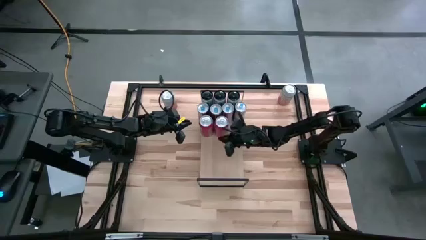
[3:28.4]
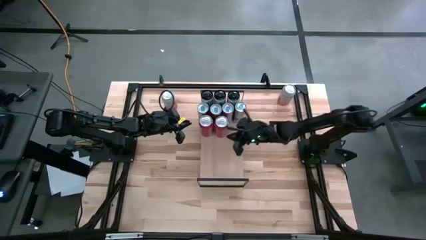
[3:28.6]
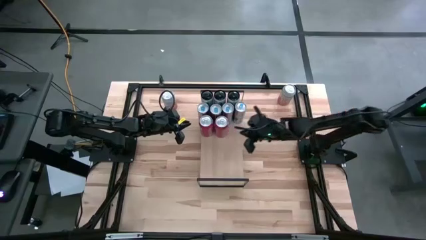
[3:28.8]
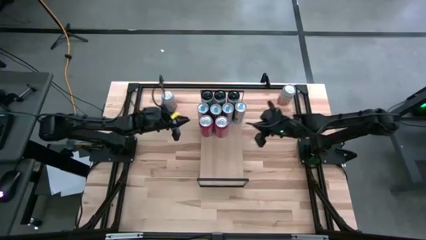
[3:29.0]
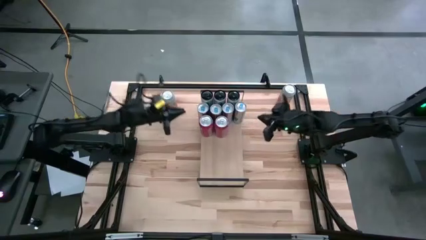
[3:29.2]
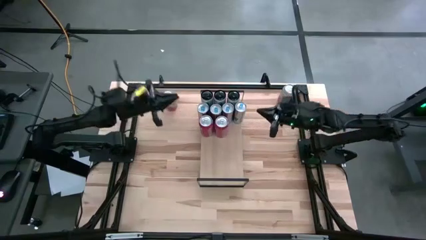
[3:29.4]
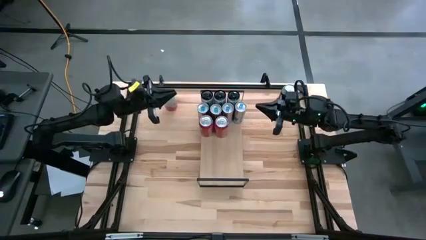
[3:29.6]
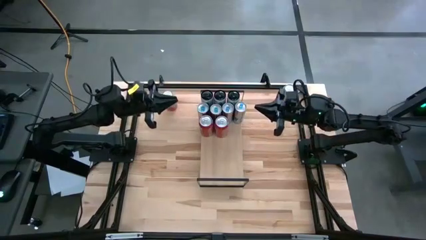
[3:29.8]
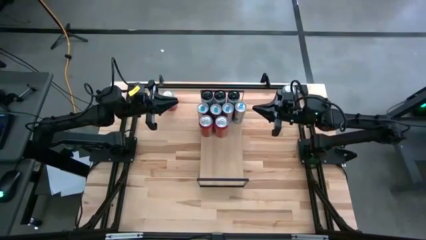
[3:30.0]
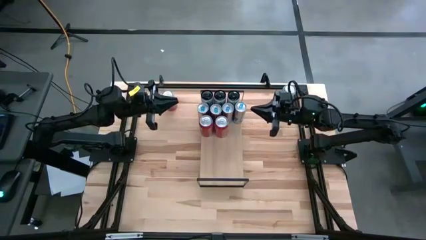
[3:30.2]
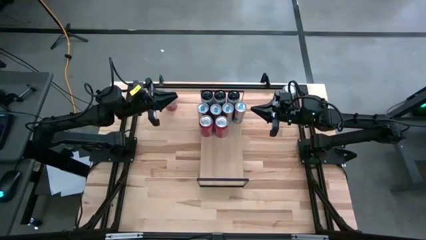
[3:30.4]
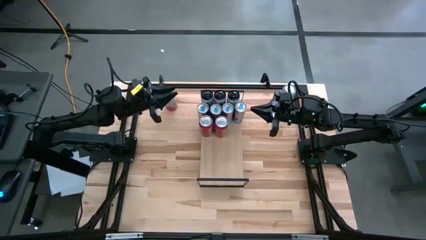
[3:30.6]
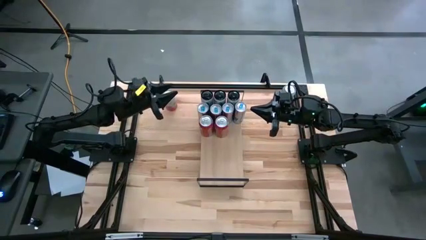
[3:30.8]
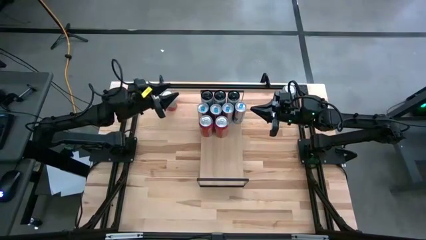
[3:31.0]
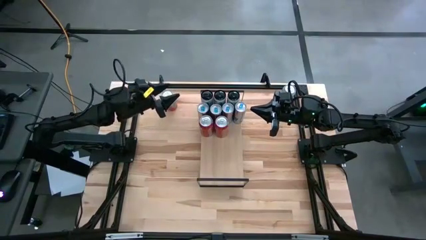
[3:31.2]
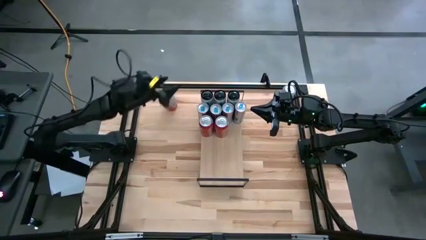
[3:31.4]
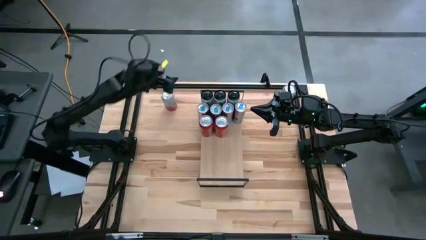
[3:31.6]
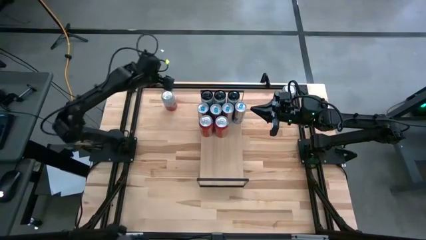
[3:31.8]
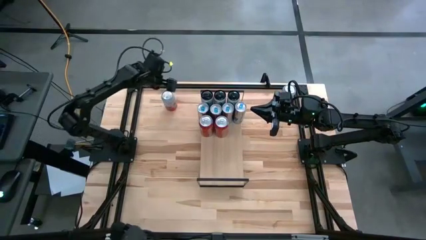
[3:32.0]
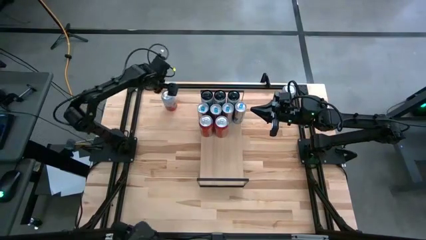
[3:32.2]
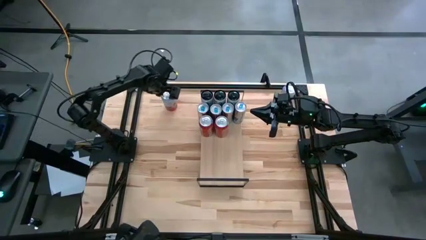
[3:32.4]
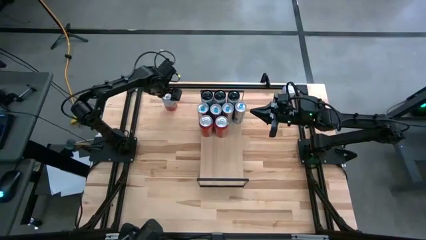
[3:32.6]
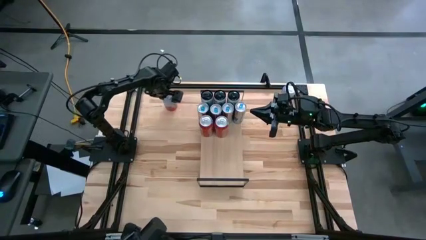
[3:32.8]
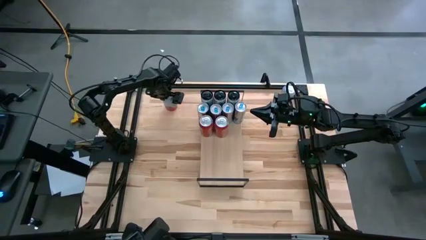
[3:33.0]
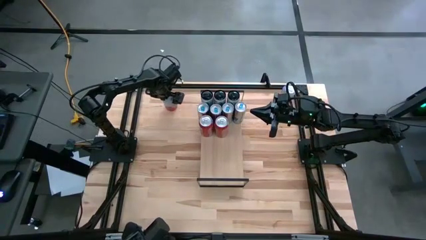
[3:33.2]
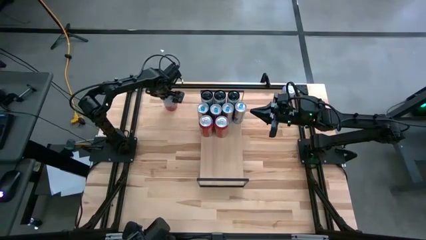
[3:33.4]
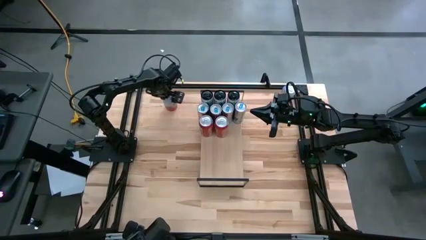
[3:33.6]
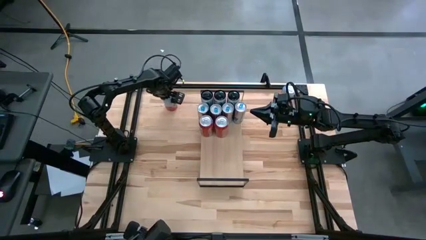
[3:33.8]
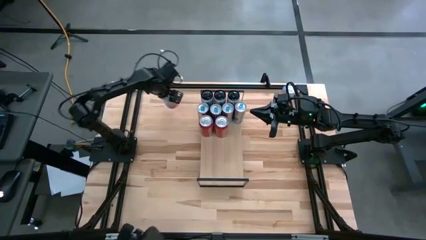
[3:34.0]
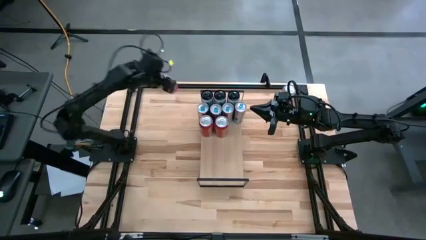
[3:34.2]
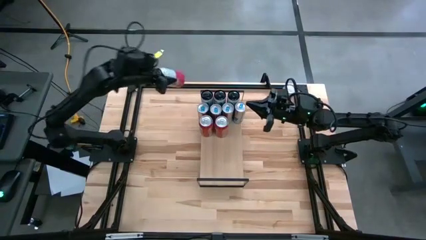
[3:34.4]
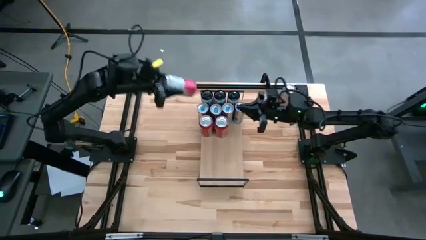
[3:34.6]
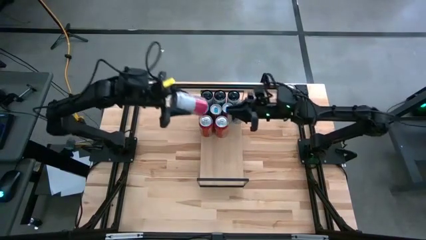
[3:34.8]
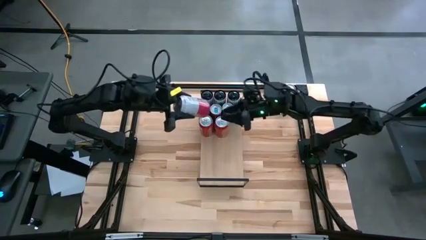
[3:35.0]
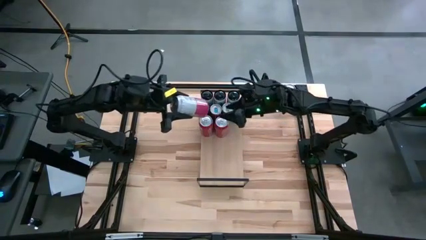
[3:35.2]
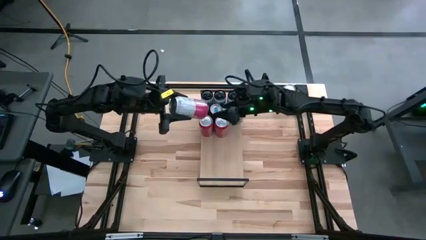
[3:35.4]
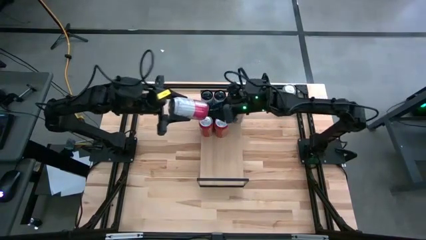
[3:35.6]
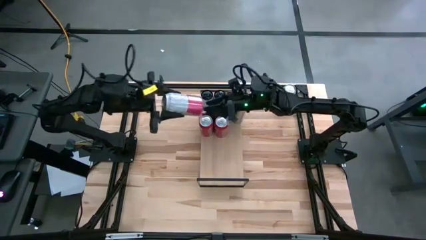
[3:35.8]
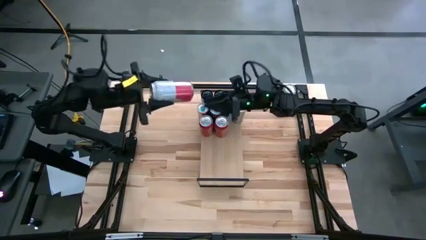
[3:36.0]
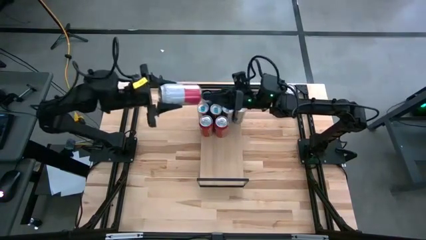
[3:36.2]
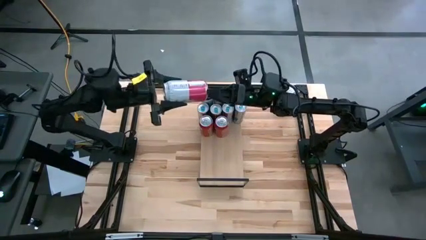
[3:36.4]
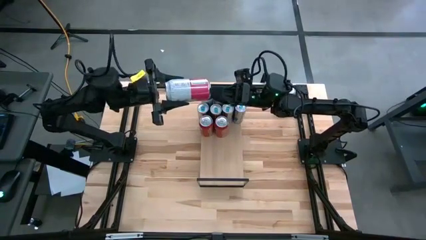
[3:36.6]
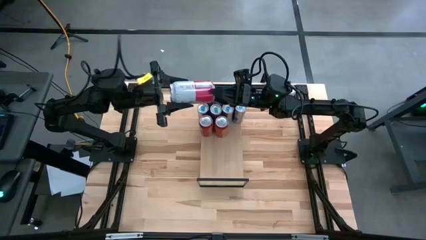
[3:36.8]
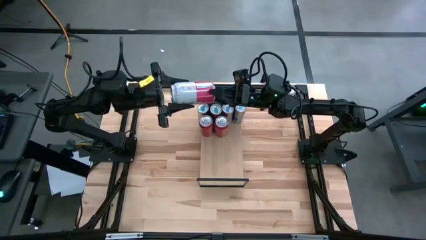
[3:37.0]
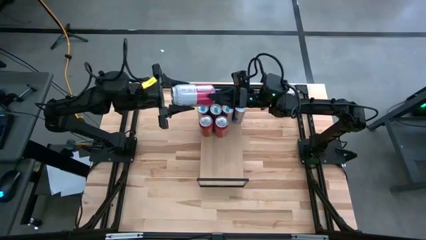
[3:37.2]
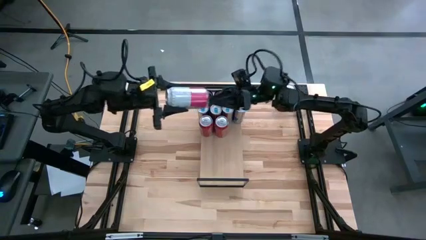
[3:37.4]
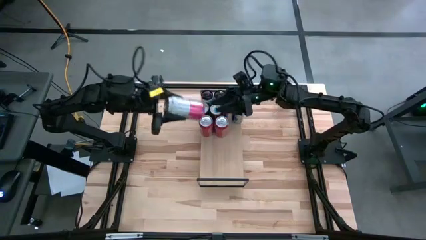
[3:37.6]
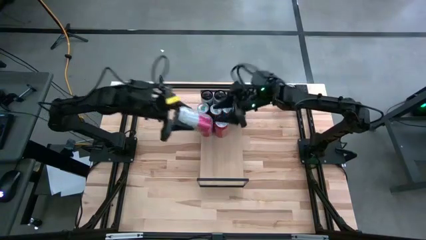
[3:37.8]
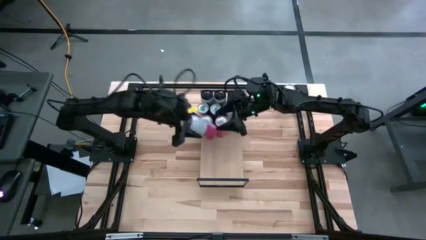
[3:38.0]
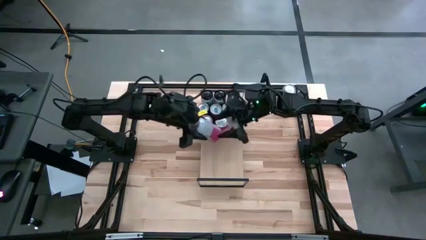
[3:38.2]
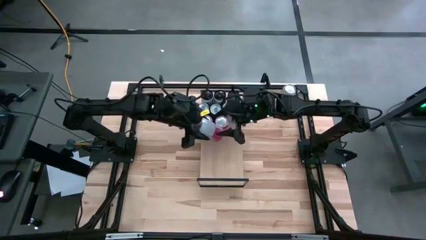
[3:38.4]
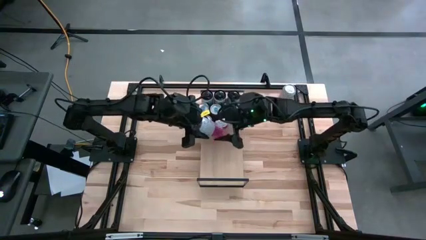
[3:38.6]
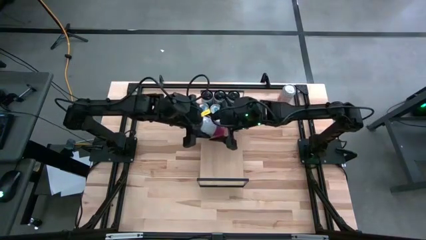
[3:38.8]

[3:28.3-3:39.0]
Task: Place canned beverage on shelf
Put the left pink-white soda can on the shelf

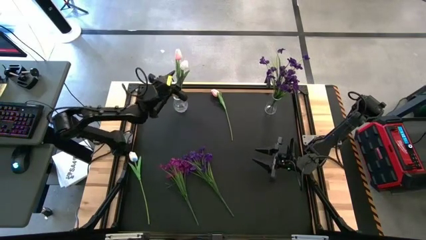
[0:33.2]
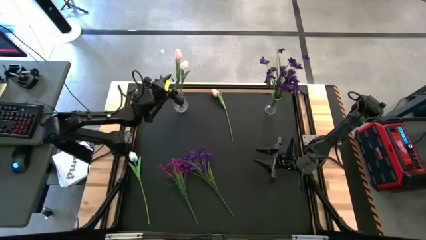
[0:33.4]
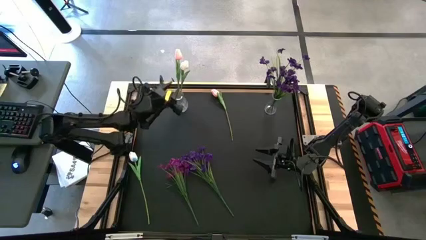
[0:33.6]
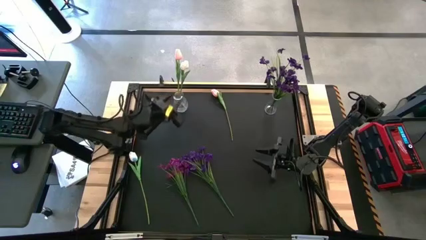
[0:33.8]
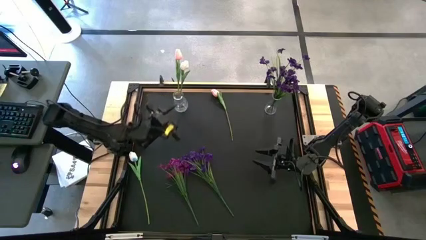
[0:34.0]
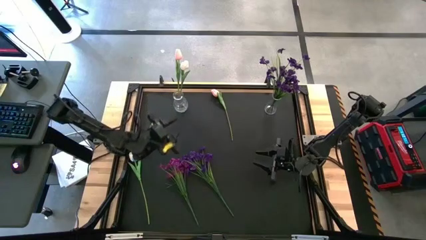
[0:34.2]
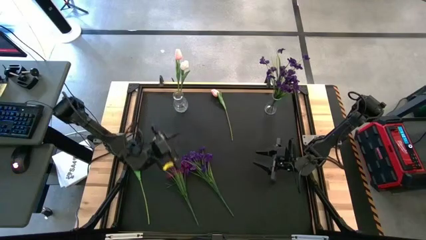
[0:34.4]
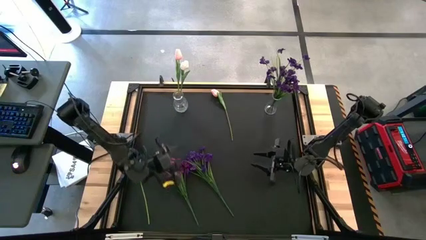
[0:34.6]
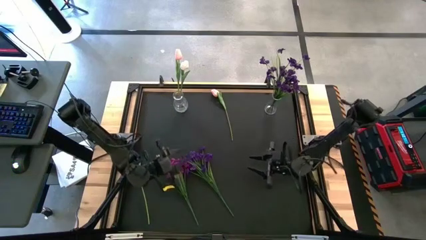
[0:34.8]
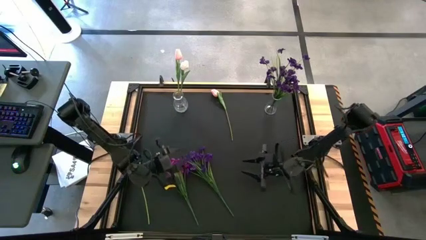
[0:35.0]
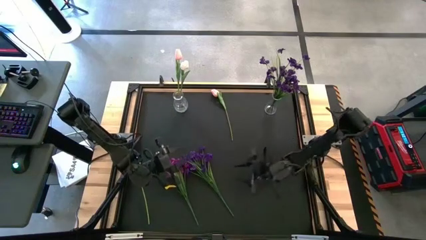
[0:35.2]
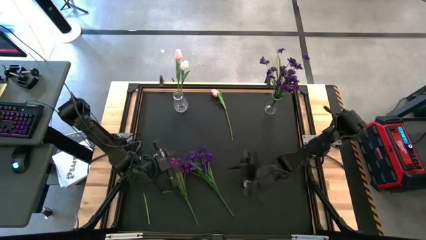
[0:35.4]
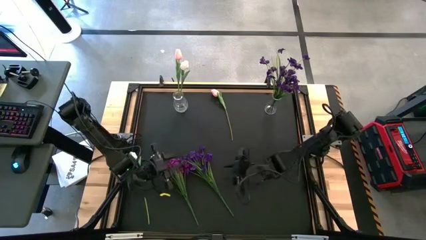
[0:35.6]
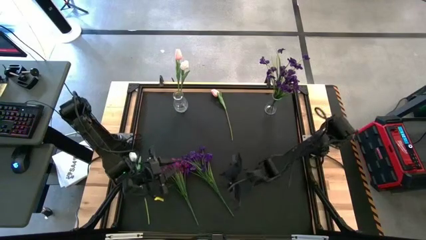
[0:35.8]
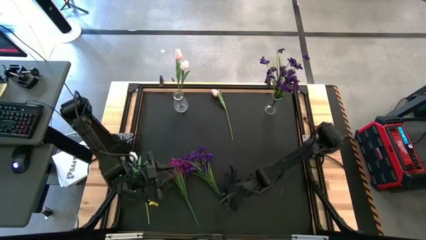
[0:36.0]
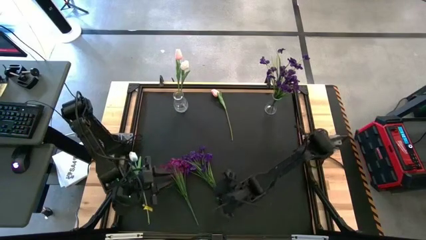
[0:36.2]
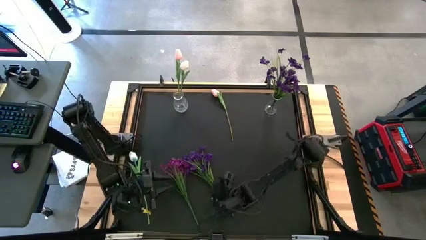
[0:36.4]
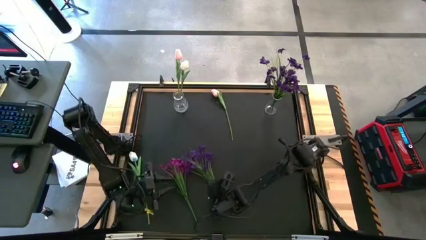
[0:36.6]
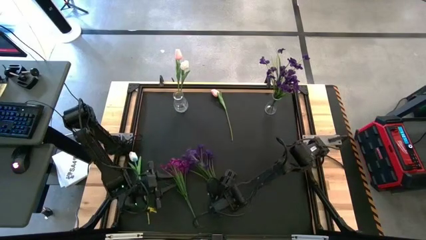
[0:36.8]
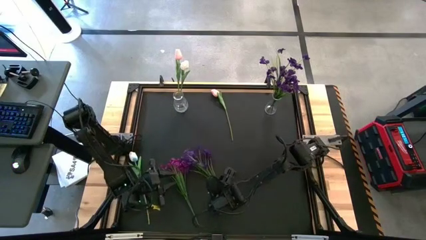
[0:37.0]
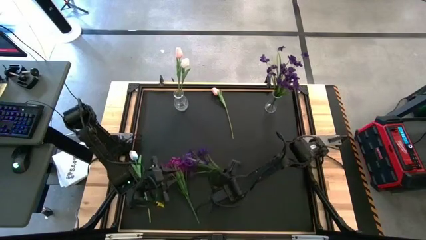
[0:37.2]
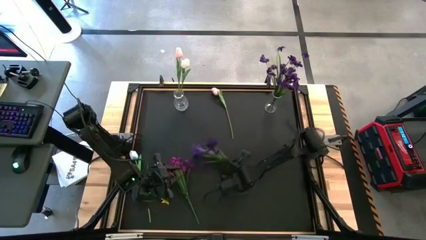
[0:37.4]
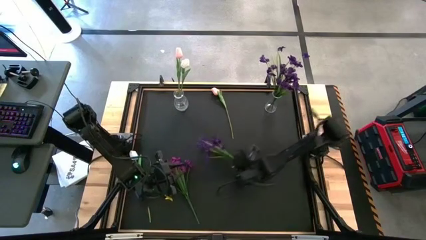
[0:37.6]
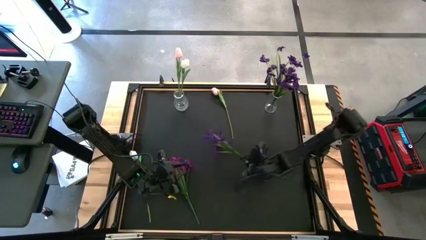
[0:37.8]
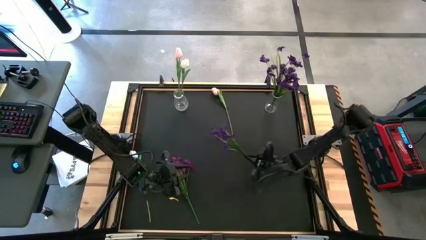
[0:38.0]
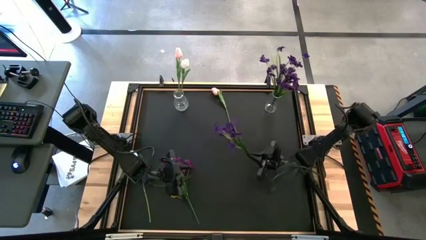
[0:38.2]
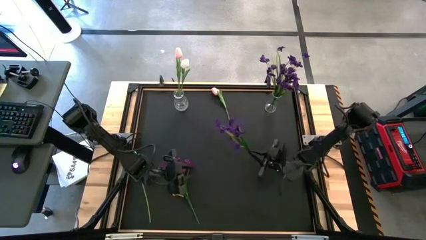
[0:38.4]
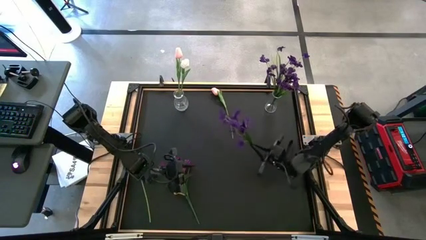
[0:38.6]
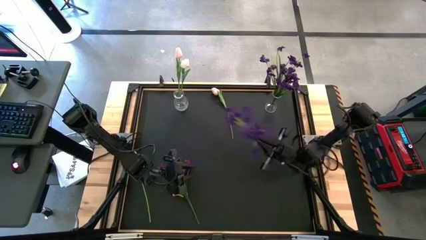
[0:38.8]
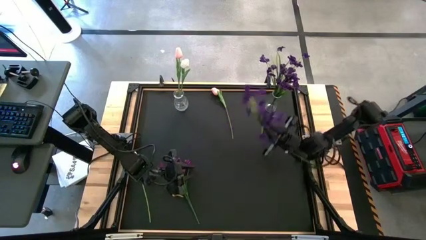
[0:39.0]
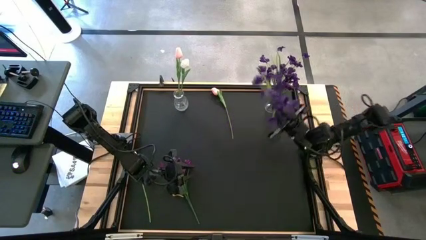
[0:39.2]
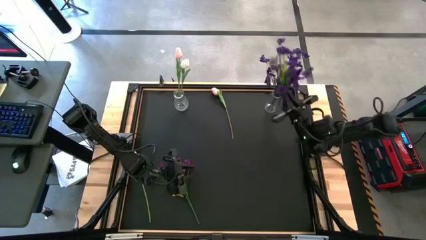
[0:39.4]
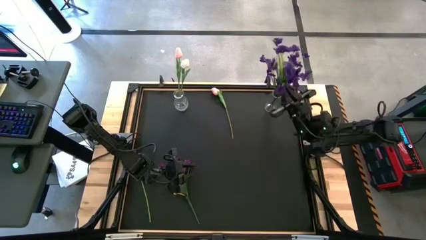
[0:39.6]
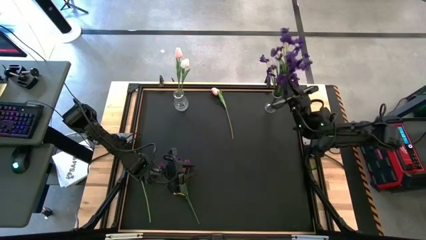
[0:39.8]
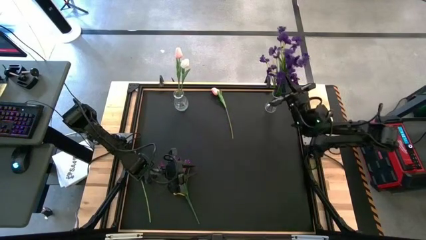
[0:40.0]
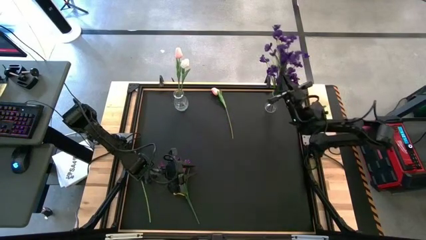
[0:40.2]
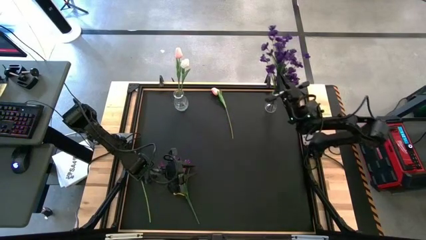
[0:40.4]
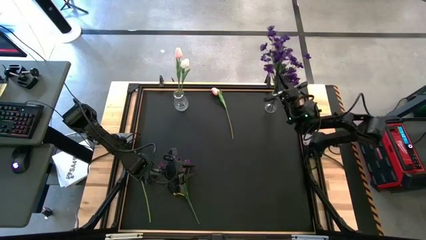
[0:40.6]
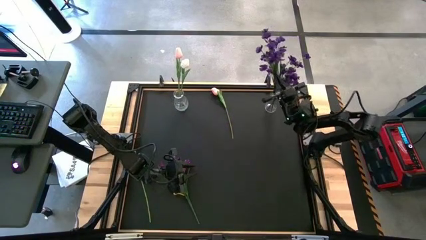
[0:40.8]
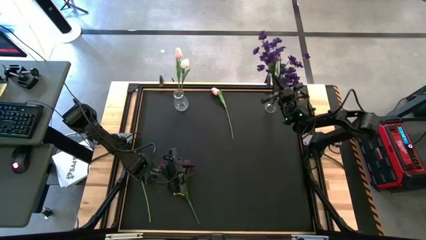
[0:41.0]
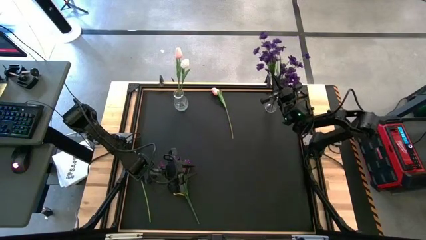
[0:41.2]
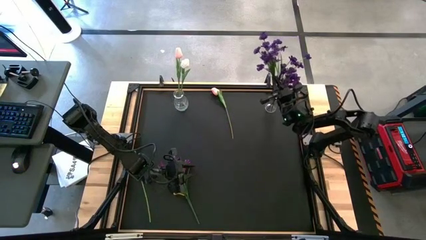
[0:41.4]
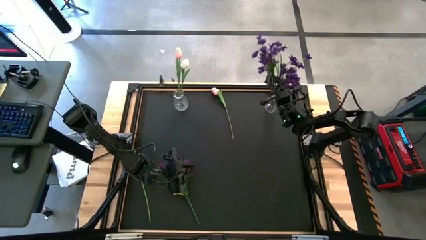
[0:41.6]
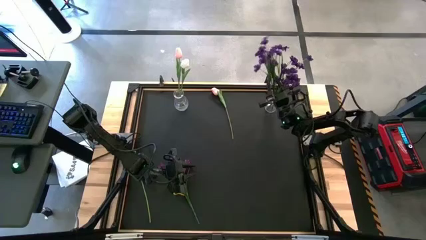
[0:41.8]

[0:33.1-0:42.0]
Task: Sort flowers into vase by color
Put the purple flowers into the right transparent vase
